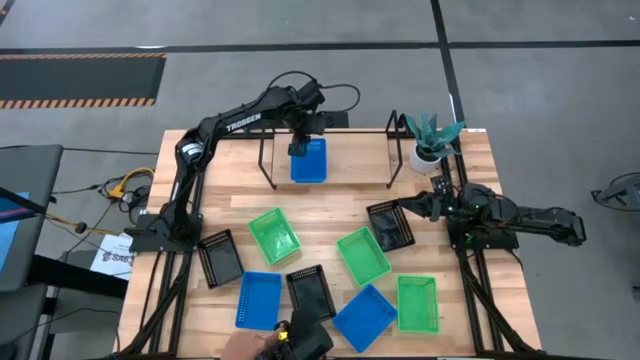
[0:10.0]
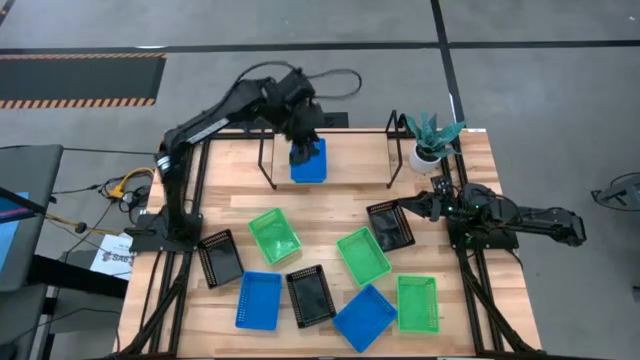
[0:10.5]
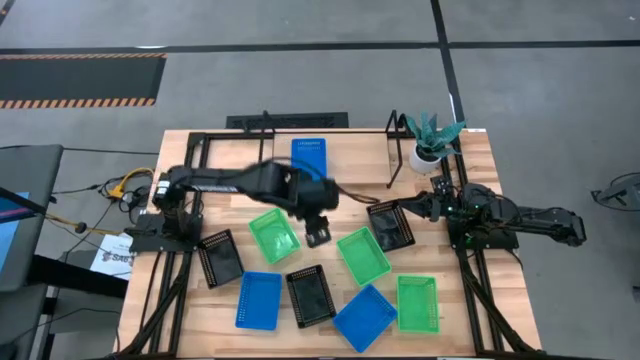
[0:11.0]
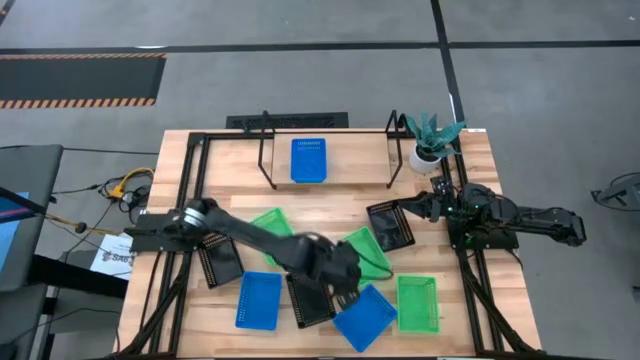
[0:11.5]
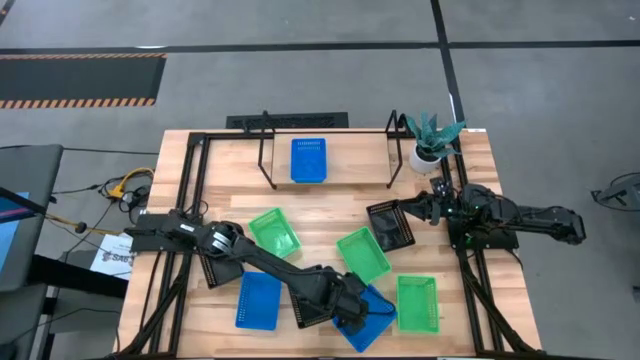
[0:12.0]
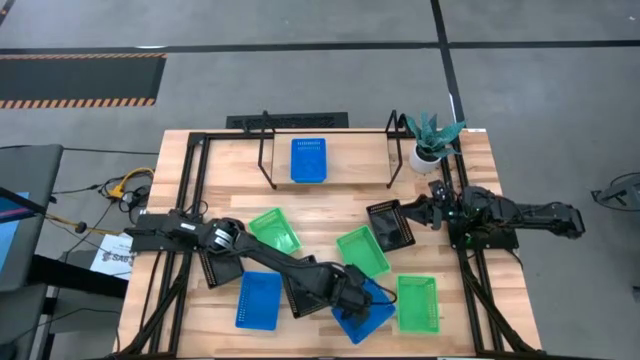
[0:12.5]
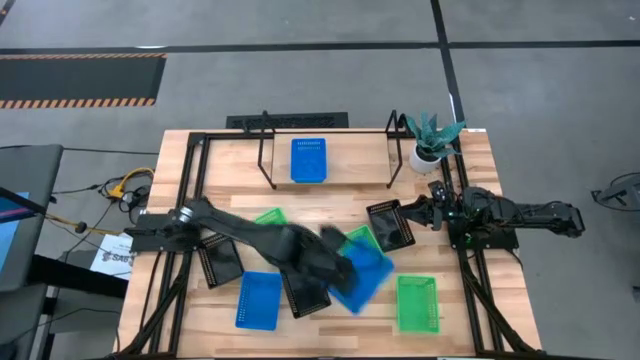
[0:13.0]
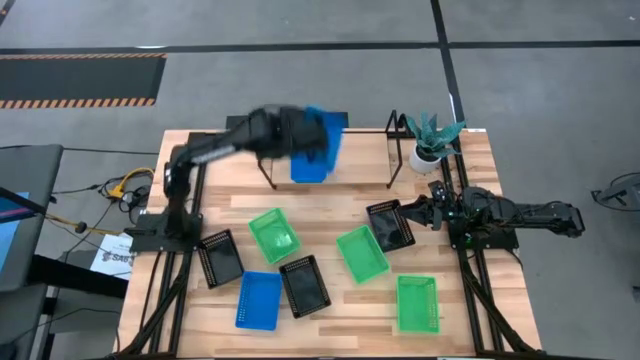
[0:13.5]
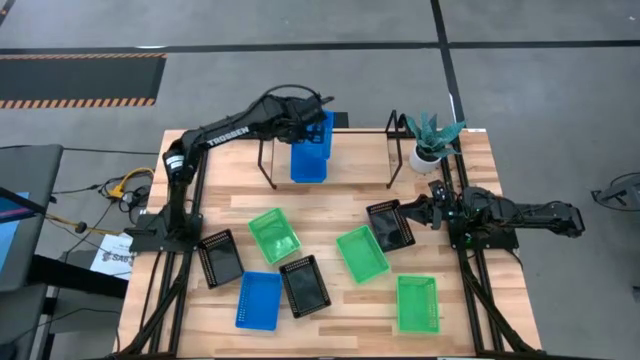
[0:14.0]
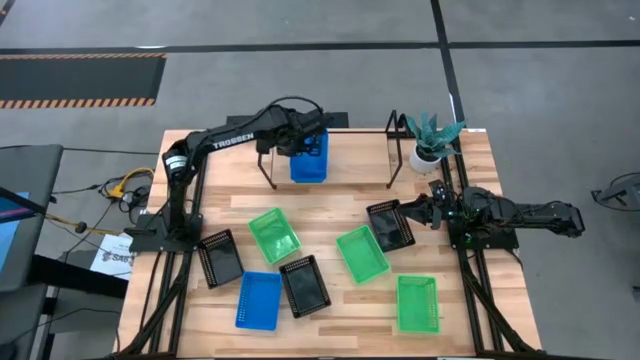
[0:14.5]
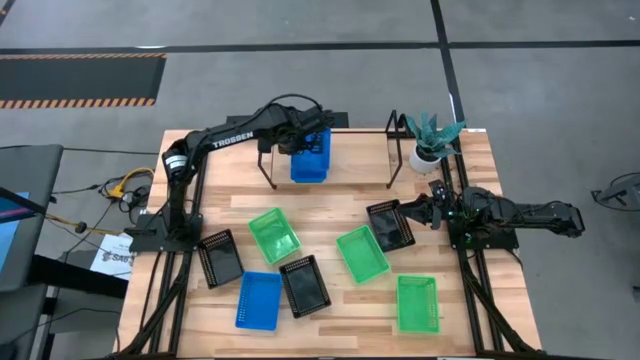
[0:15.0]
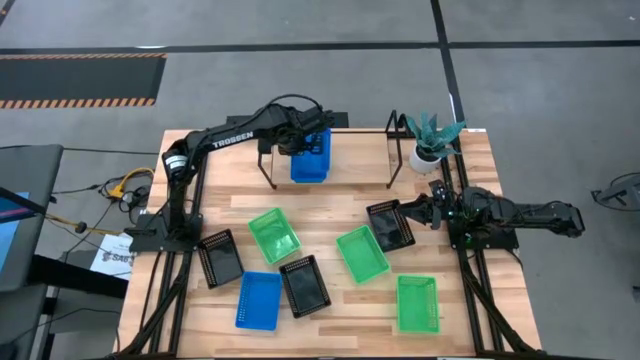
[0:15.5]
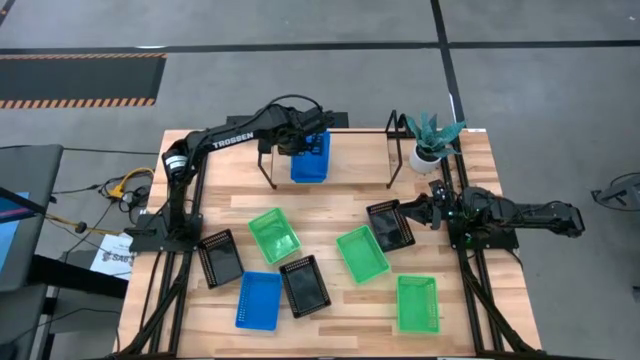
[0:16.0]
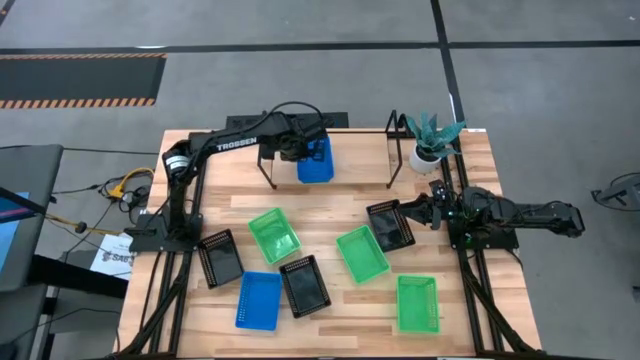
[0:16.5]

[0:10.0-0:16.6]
Task: Stack baskets on shelf by color
Stack the right blue bin on top of the other blue bin on the shelf

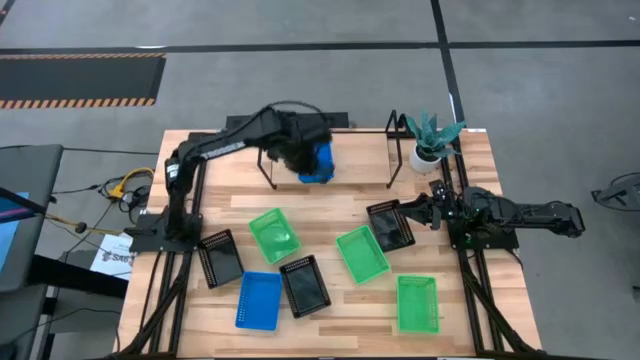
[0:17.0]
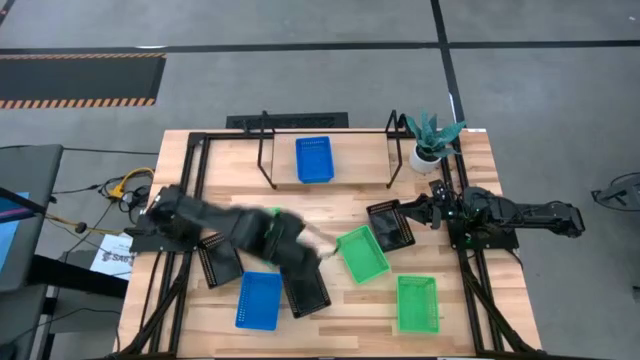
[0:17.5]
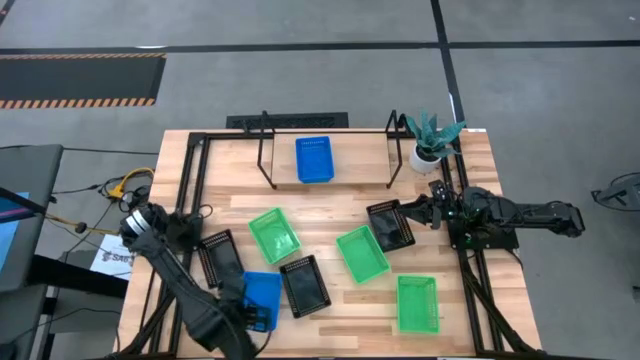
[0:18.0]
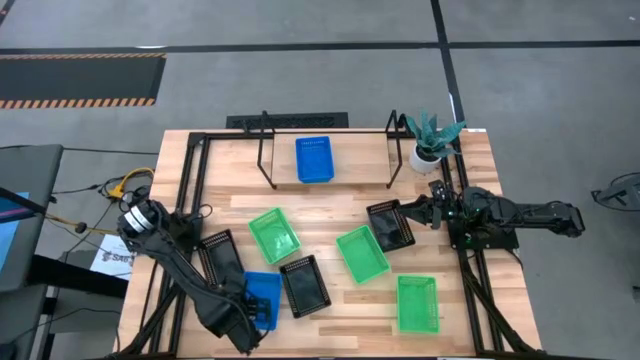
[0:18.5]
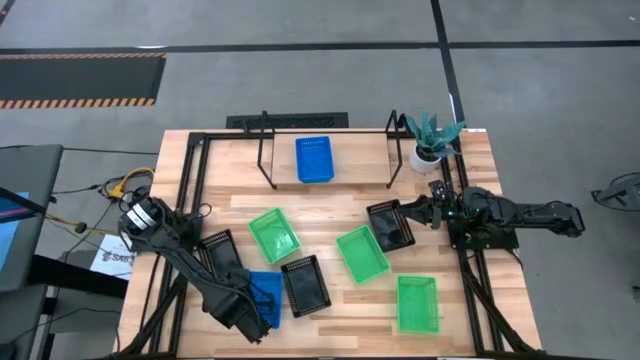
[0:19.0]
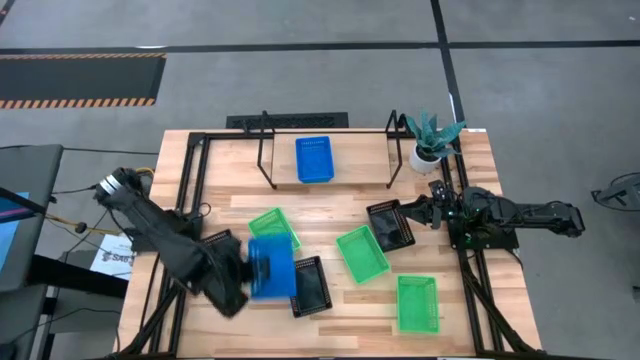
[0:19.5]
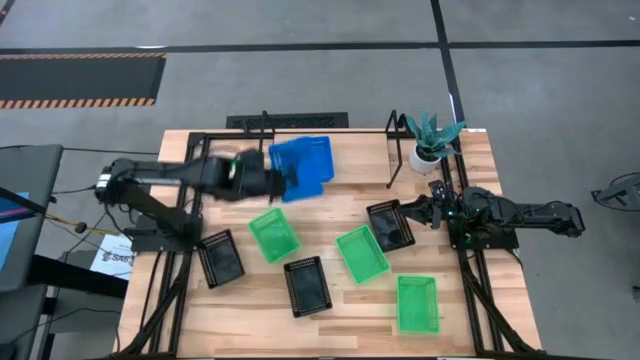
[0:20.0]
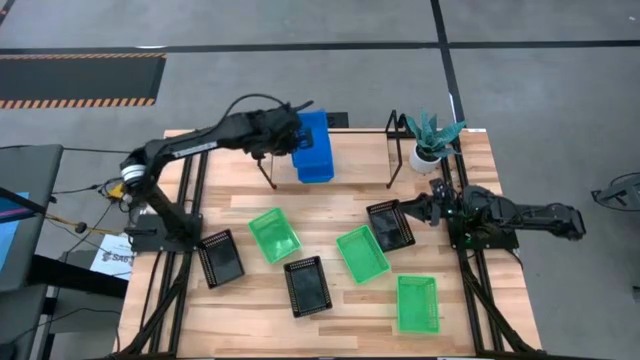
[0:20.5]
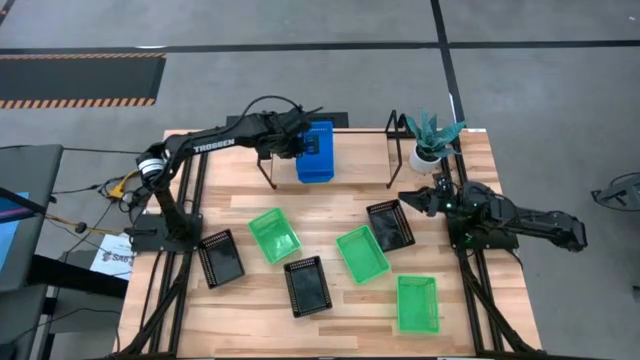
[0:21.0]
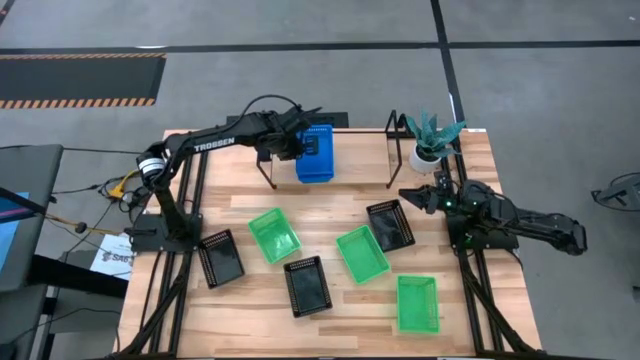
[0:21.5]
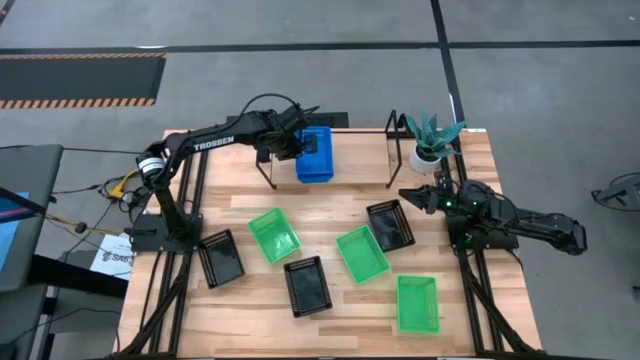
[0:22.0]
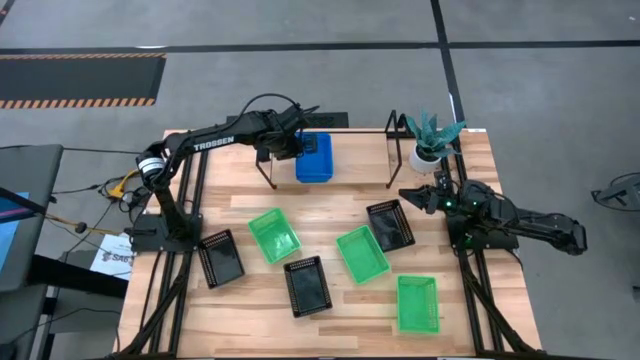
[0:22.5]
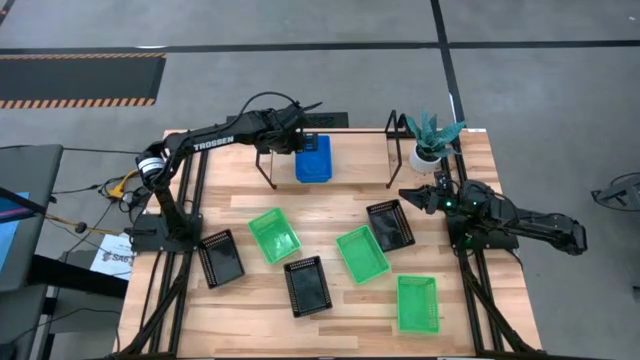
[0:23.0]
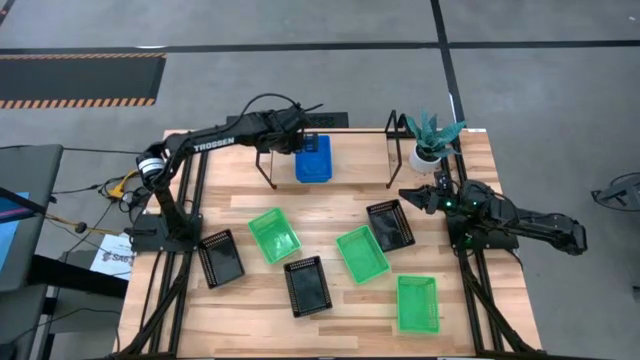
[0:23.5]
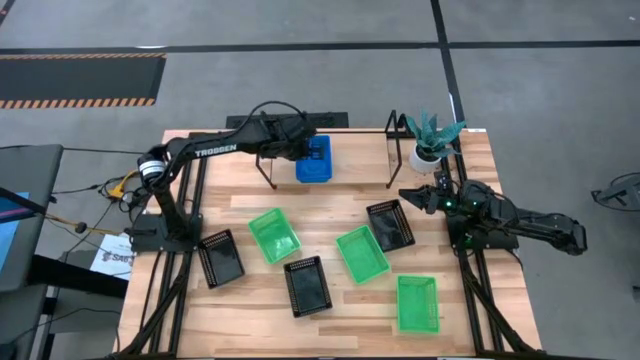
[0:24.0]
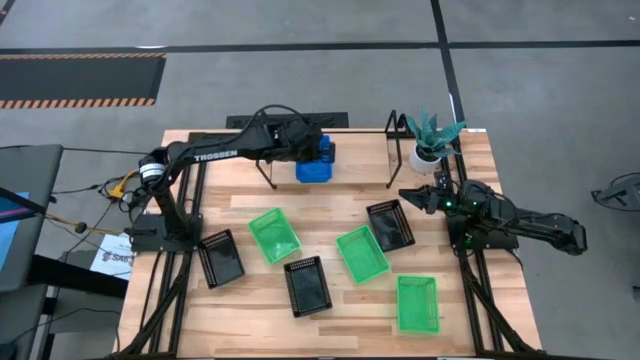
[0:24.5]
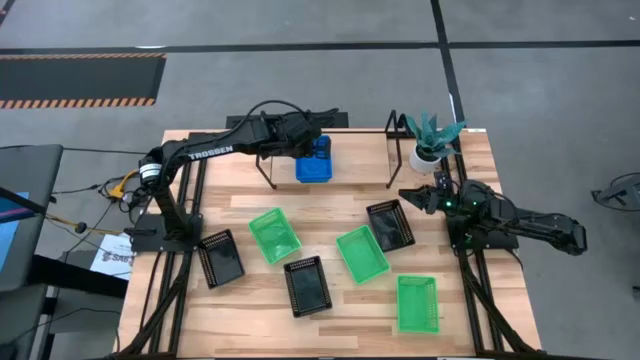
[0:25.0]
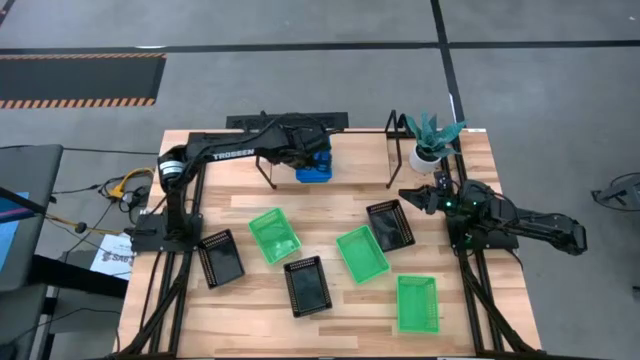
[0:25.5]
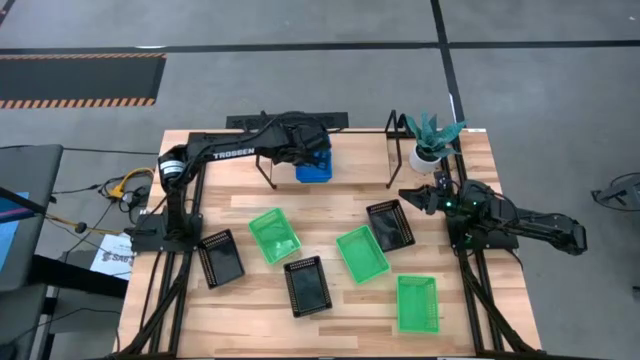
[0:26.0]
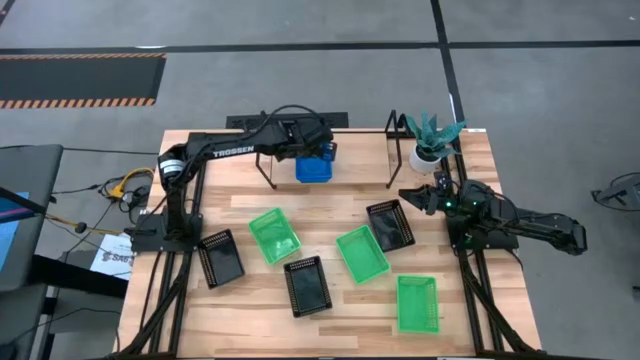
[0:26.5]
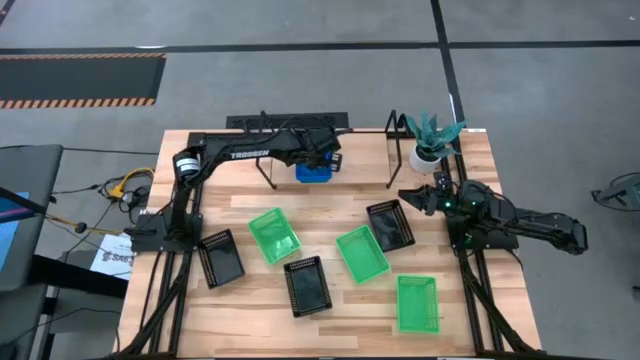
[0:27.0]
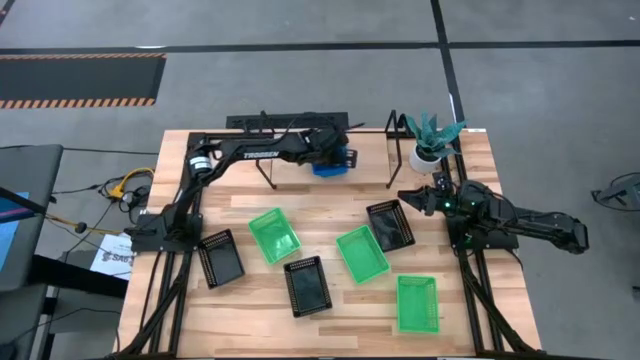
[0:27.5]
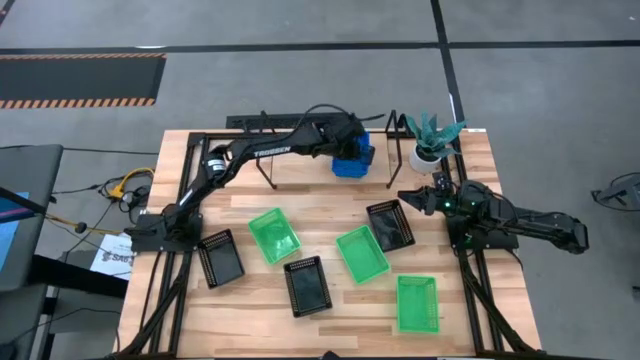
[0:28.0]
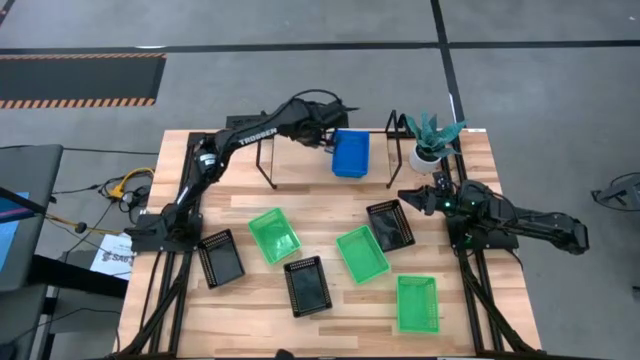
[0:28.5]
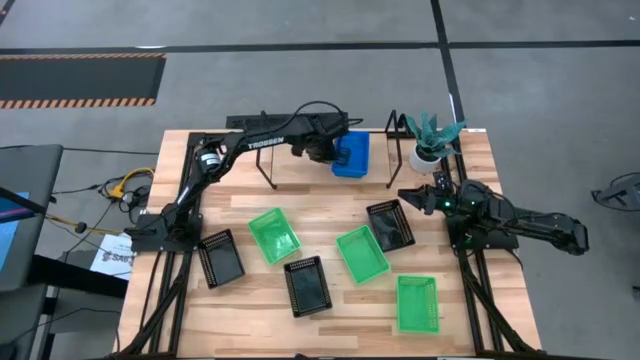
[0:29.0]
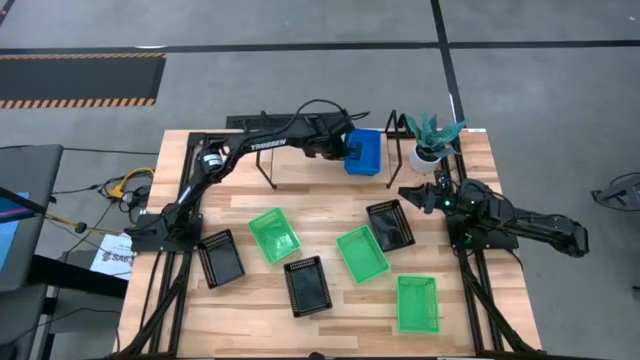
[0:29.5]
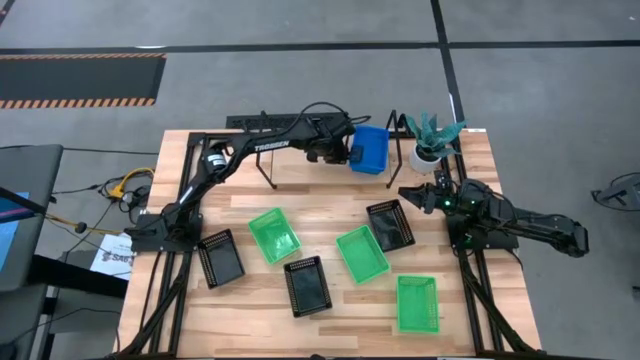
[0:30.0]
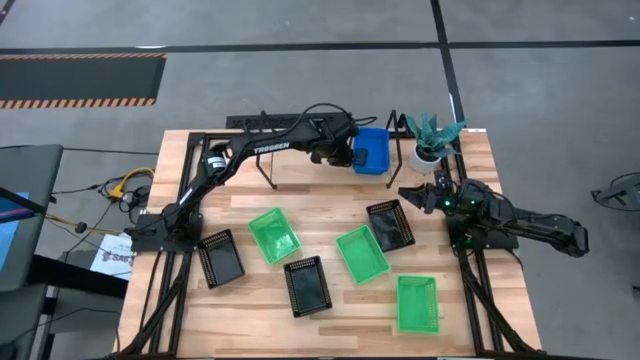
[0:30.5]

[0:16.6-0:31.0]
Stack the blue bin on top of the other blue bins on the shelf
